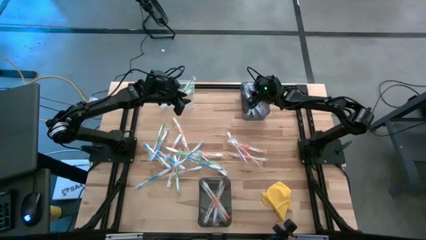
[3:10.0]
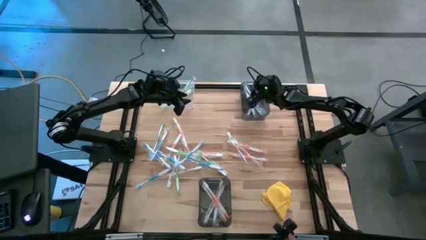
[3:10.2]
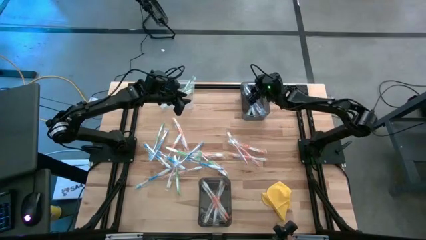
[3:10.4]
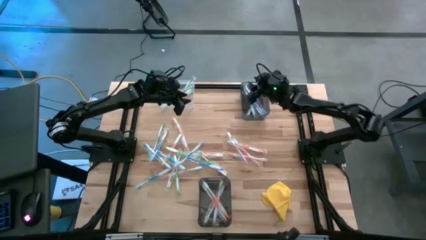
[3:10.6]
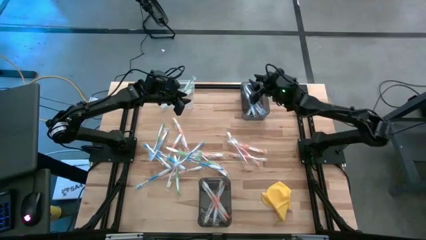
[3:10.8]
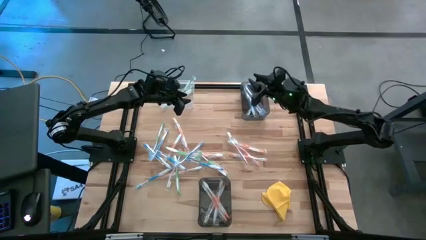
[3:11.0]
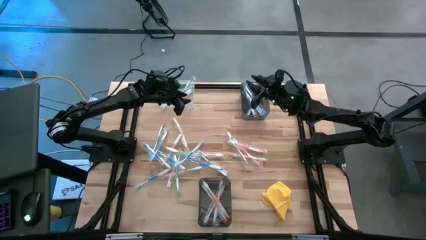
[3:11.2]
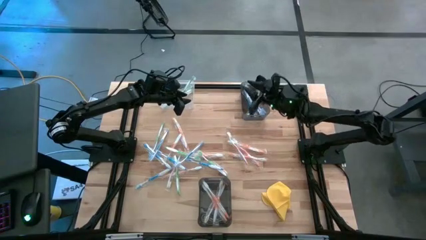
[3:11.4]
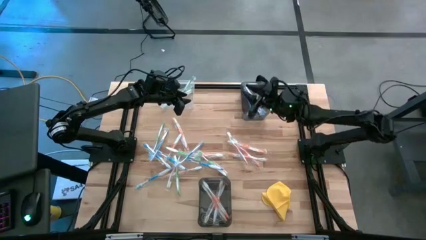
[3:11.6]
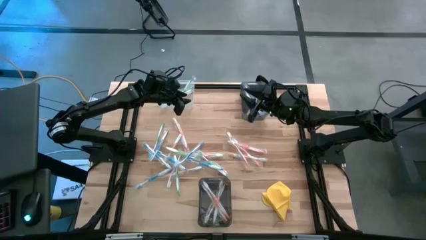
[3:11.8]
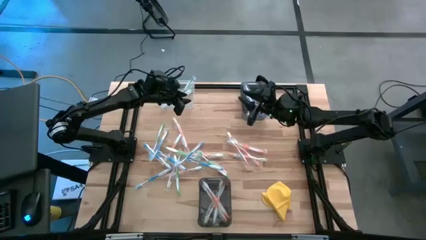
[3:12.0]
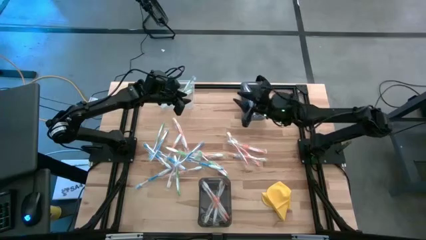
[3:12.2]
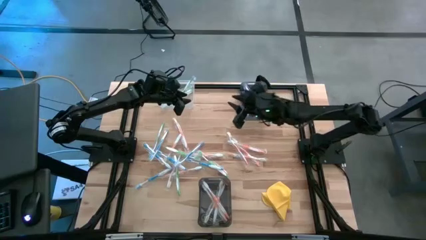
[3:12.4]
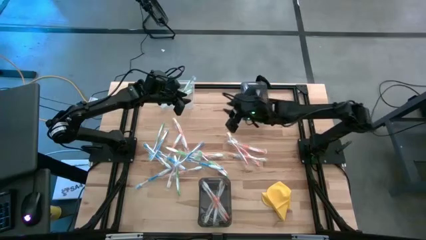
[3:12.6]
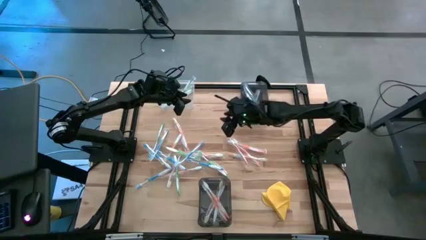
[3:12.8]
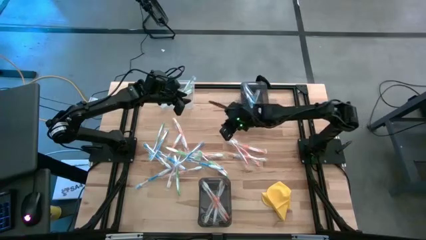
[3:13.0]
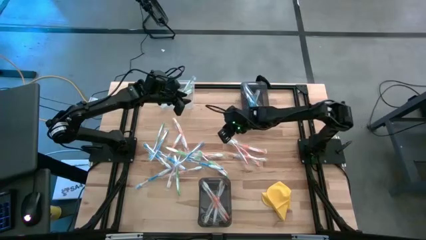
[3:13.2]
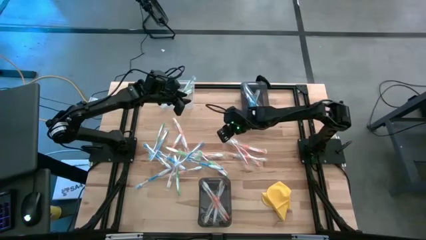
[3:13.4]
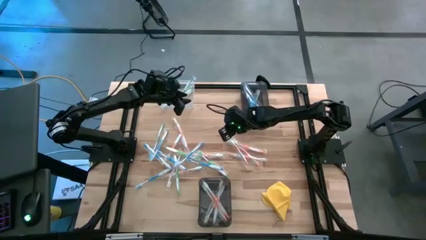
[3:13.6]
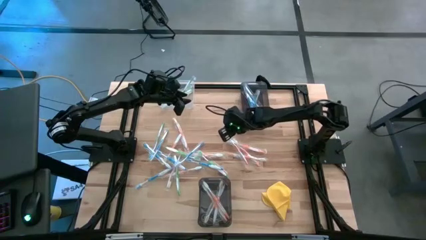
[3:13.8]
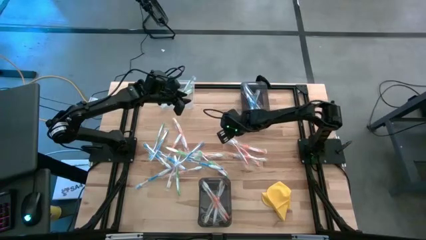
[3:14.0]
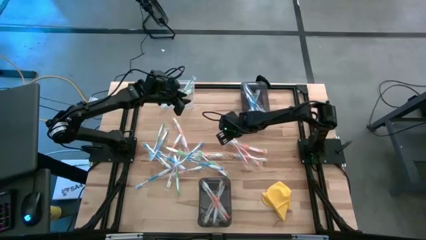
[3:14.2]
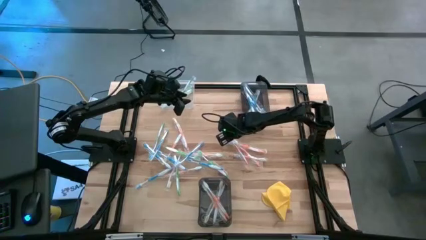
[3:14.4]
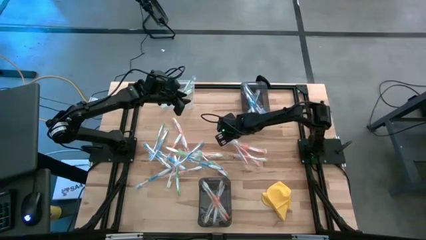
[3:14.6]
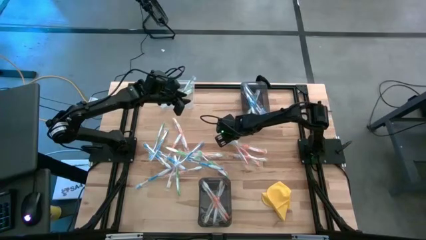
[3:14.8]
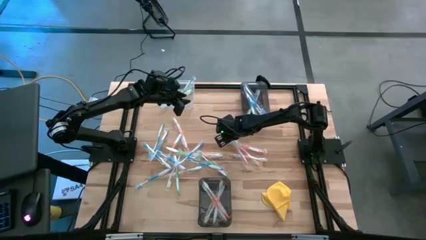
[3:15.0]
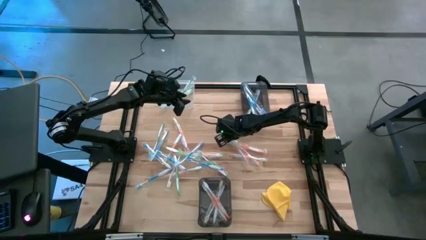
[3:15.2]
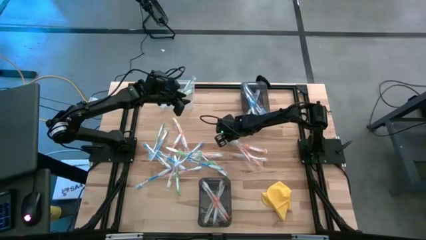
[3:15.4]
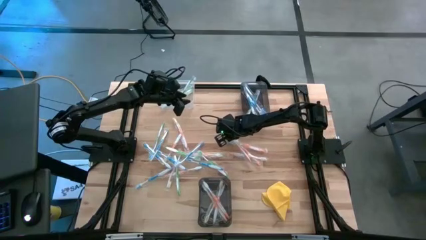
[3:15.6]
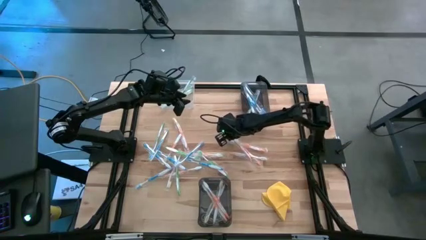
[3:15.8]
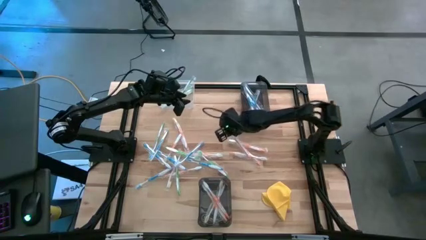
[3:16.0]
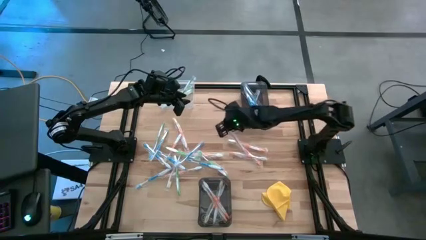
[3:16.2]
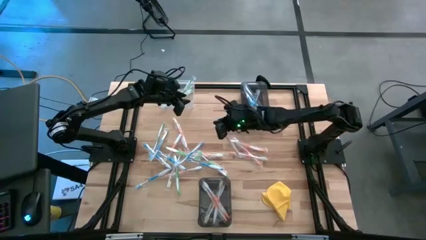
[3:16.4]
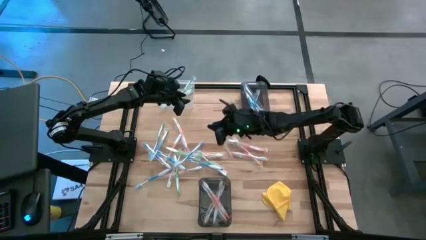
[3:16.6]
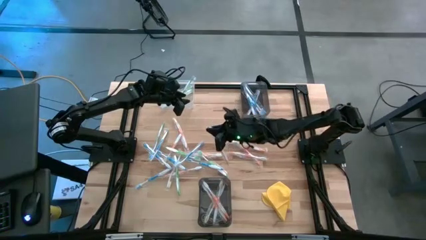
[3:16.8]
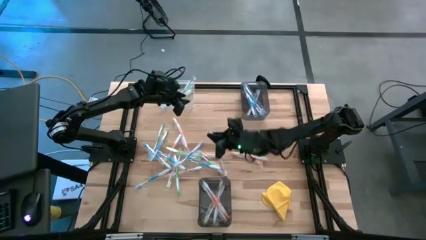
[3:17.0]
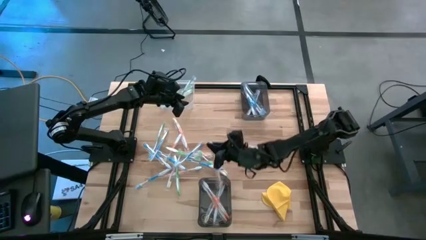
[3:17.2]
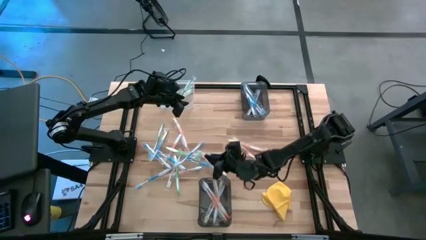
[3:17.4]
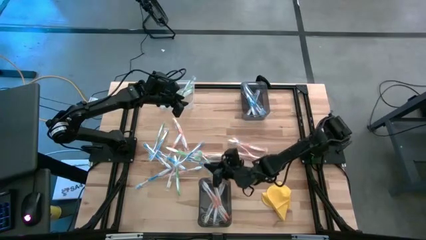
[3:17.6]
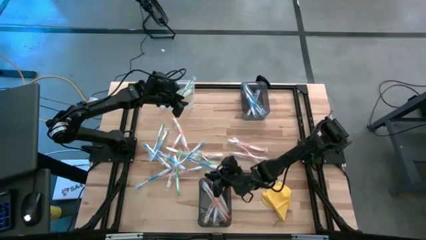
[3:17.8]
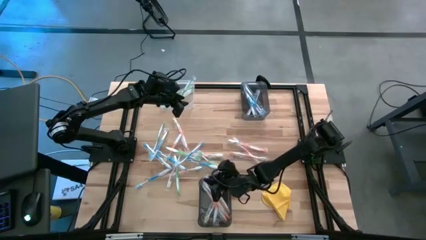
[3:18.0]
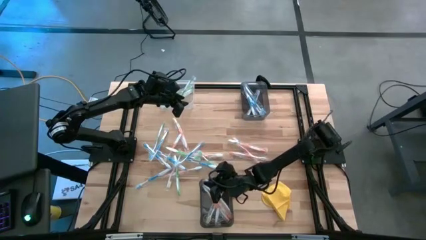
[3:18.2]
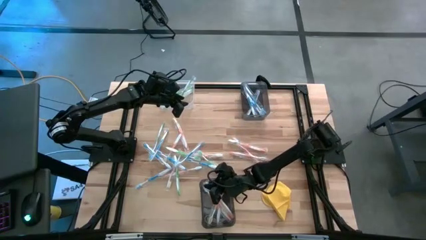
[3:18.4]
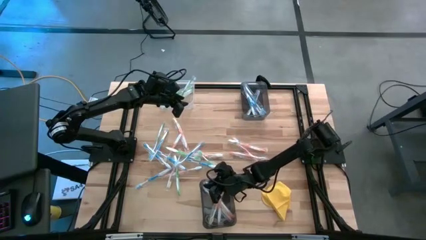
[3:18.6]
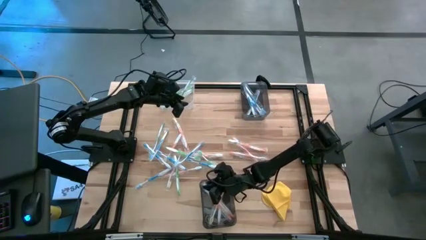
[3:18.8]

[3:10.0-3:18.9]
Task: Pick & Place Toothbrushes
Put the orange toothbrush into the bottom black bin

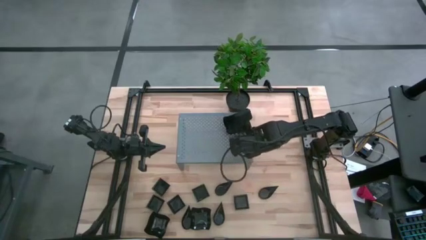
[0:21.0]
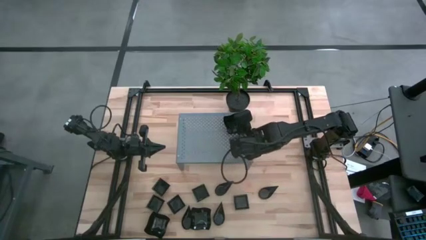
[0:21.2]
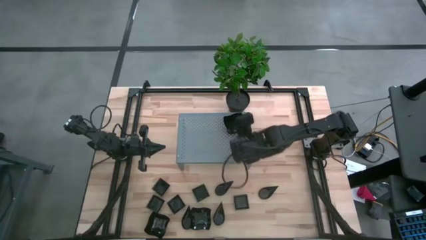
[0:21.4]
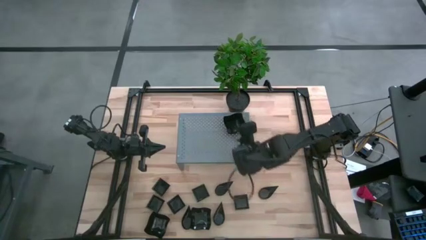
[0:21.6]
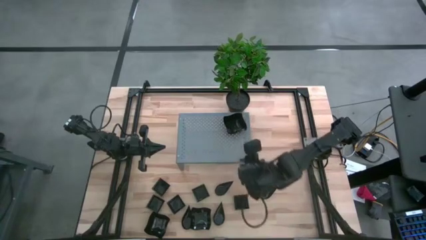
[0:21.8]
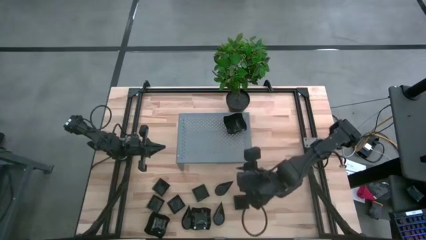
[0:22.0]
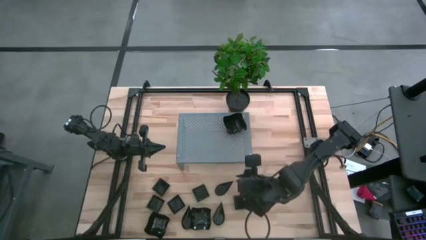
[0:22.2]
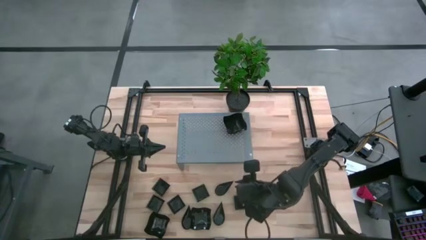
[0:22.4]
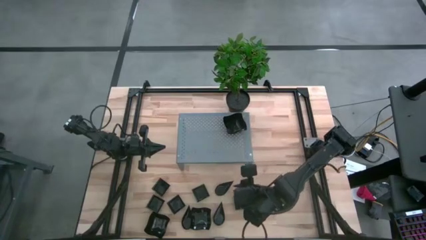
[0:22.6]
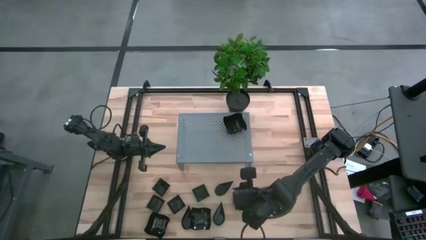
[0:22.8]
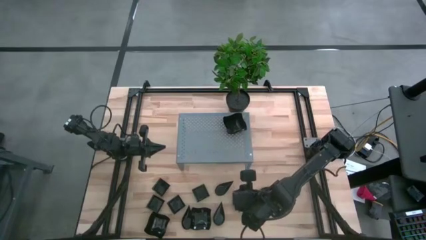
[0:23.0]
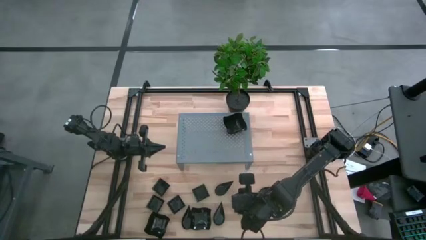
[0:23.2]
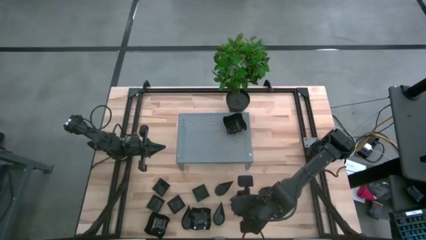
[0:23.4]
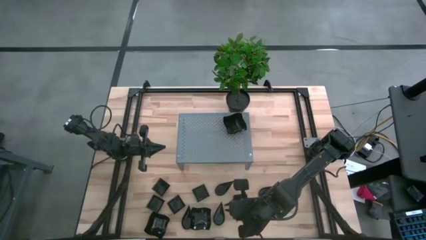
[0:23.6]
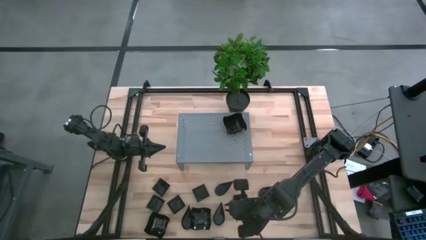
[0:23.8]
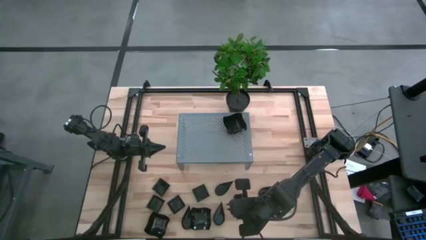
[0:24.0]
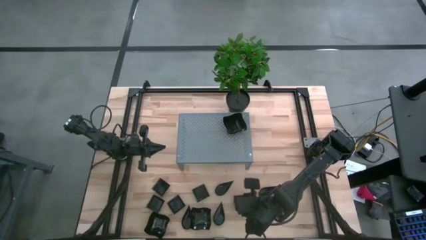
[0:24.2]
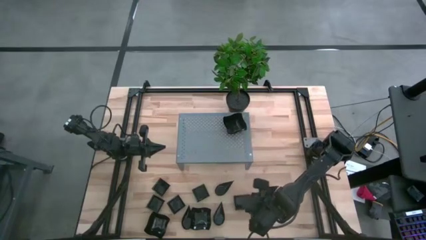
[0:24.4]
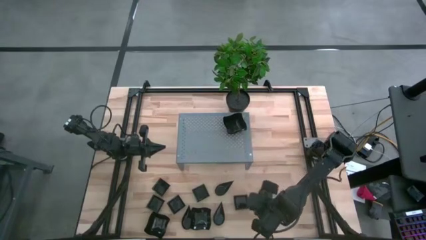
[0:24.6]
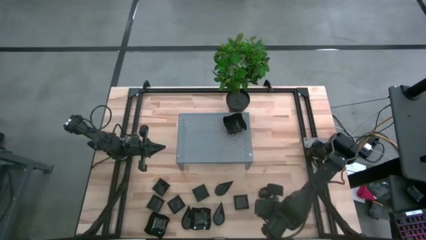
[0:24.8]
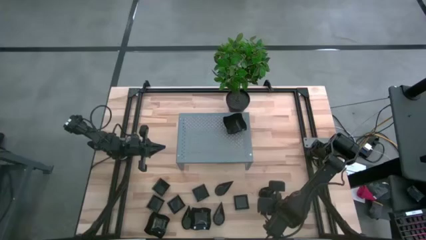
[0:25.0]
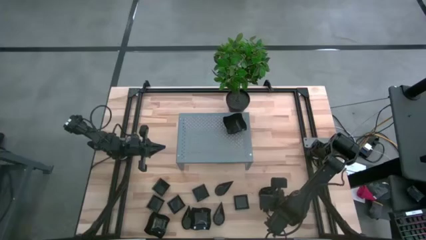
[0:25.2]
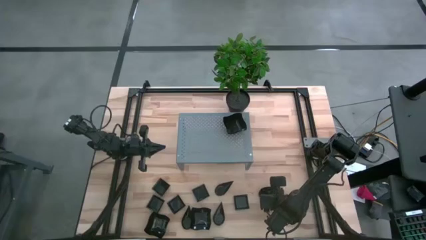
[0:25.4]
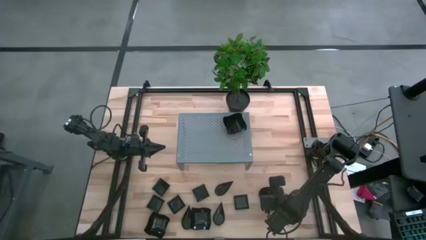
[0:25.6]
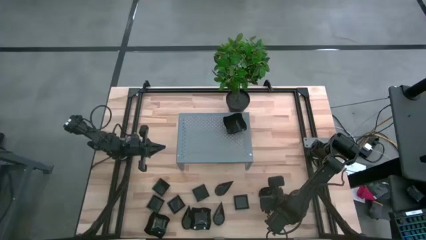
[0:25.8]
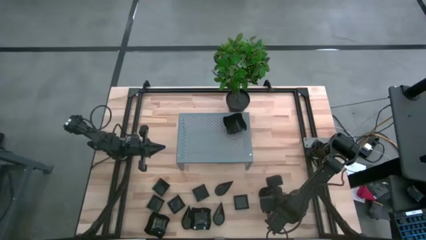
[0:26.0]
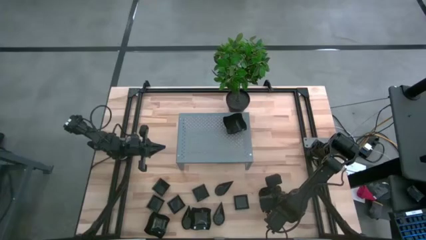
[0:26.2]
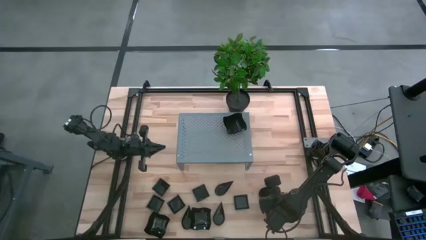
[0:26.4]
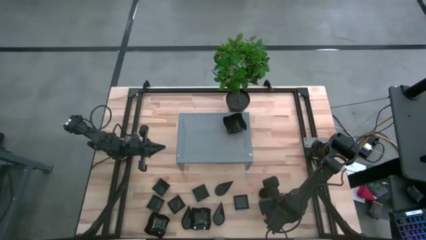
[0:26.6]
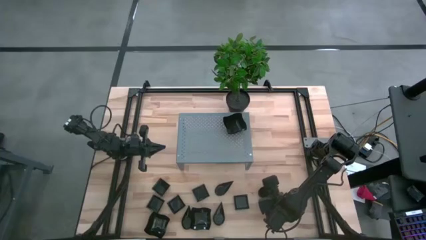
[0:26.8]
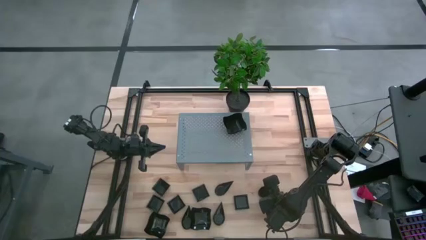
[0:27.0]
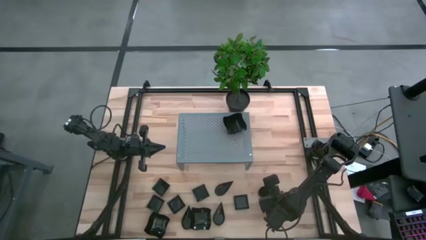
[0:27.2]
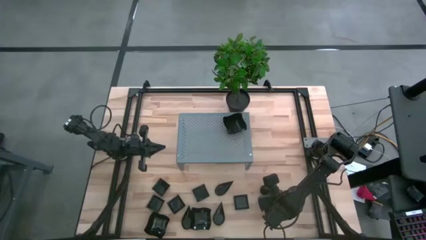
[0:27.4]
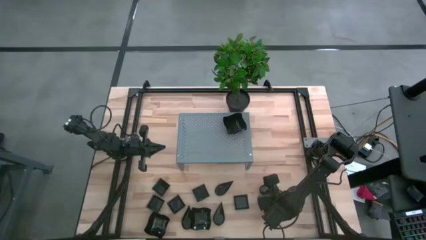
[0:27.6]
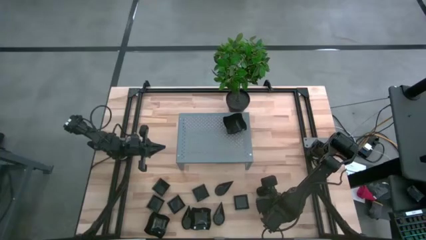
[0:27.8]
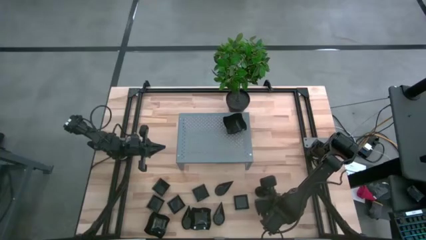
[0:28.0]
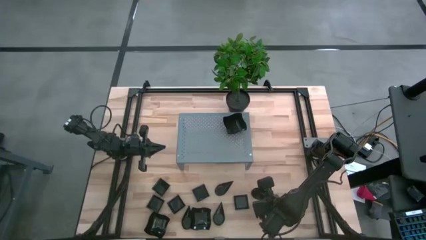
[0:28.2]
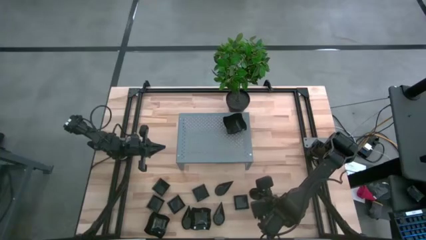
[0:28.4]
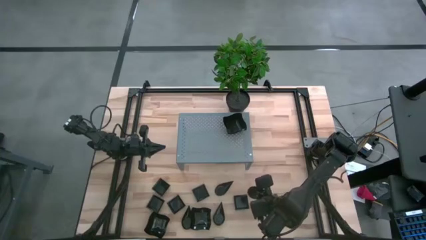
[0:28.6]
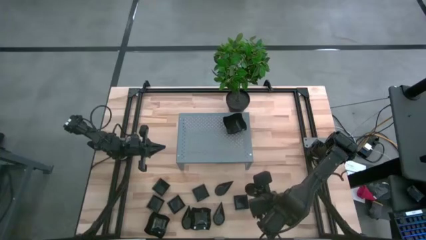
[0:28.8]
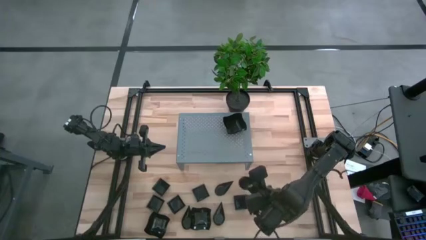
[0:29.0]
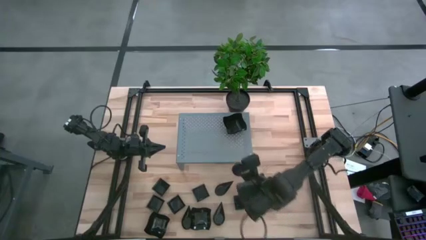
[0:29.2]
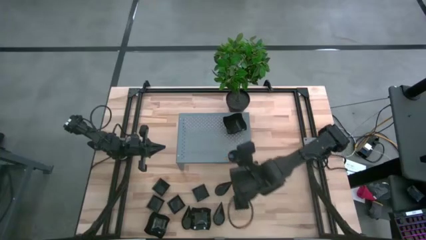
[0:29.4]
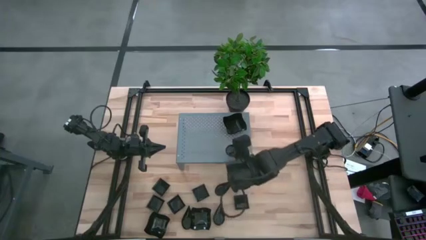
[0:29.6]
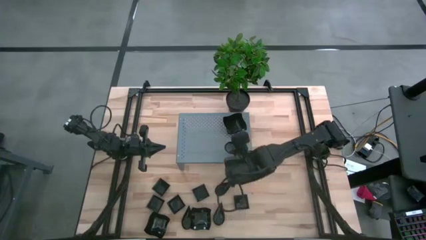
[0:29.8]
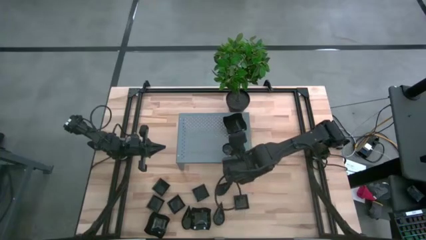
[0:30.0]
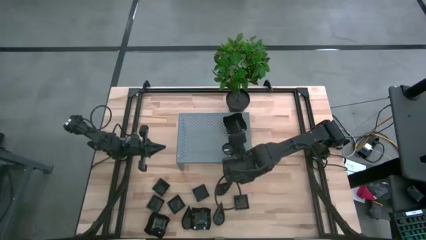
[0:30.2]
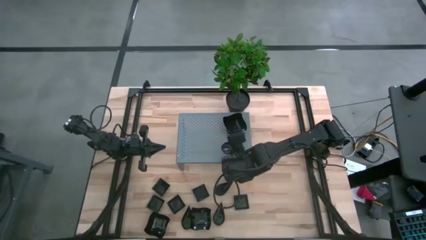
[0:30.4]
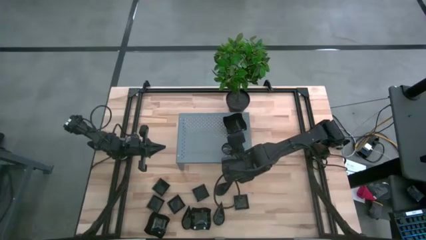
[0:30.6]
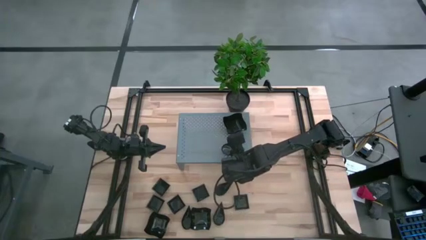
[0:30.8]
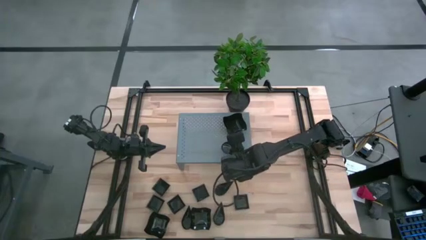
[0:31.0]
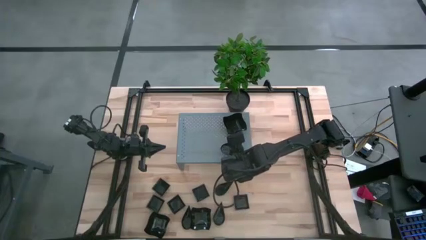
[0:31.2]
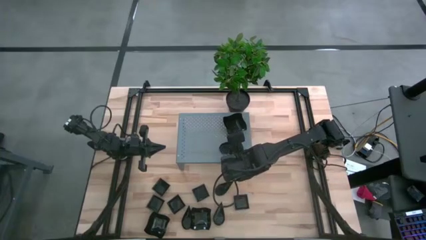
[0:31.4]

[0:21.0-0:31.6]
Task: Pick & Place Mini shaped plates
Put the black drop-shaped plate on the shelf
